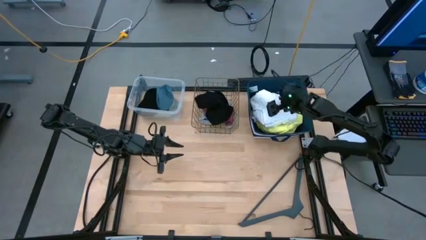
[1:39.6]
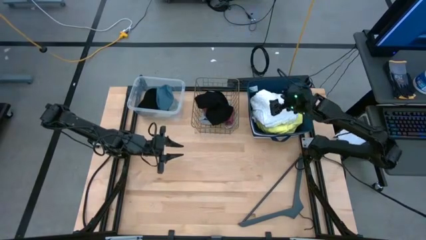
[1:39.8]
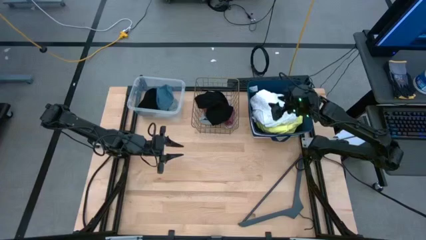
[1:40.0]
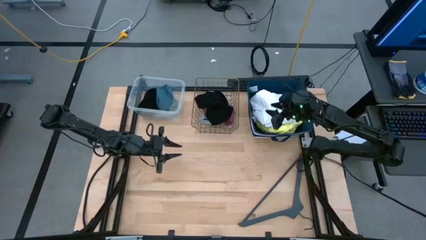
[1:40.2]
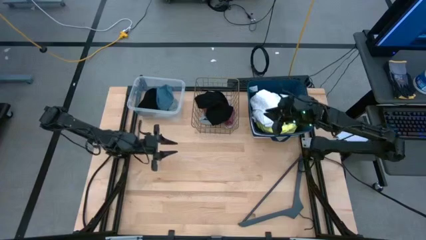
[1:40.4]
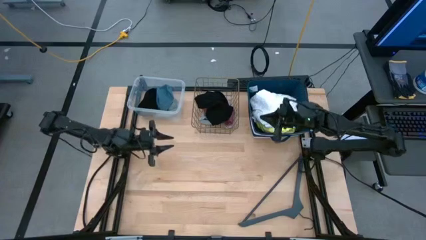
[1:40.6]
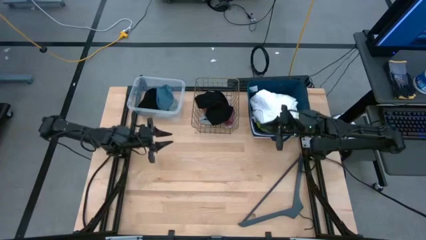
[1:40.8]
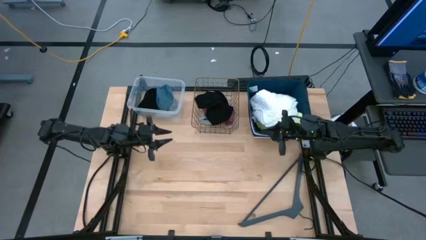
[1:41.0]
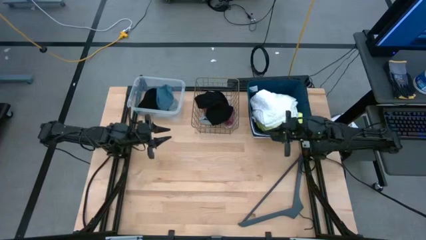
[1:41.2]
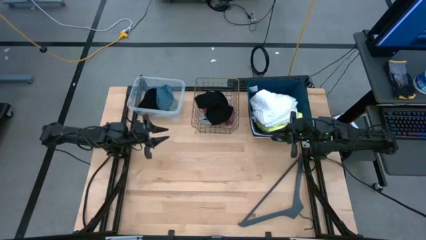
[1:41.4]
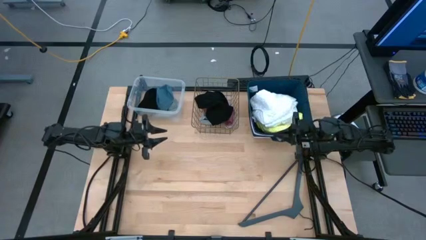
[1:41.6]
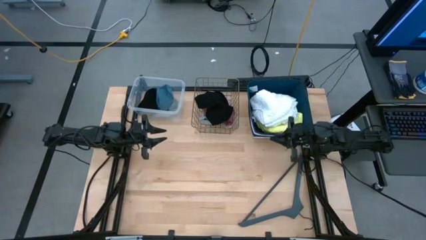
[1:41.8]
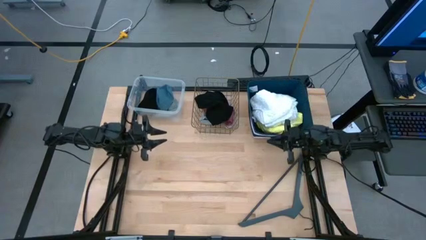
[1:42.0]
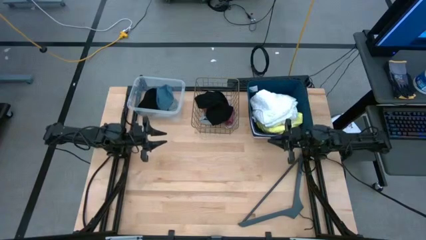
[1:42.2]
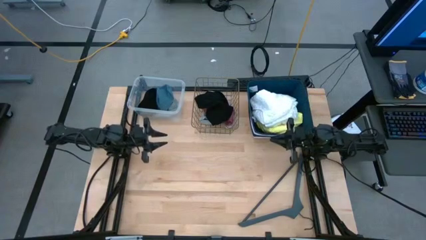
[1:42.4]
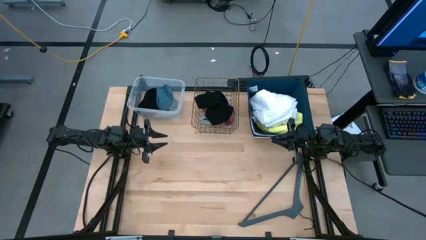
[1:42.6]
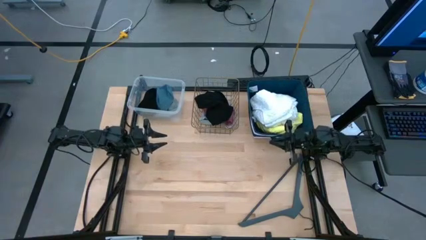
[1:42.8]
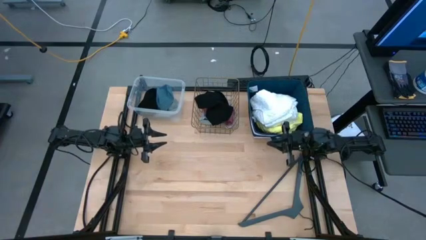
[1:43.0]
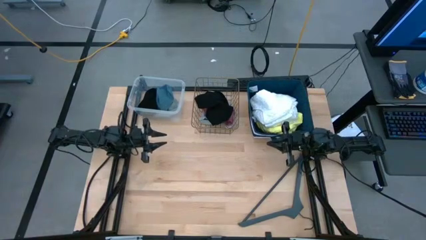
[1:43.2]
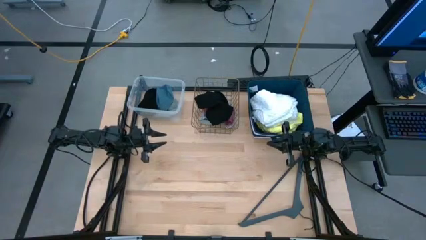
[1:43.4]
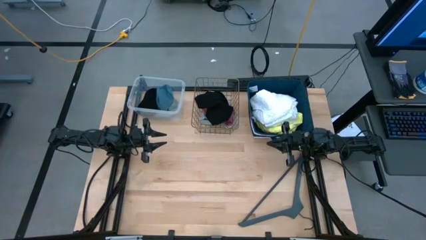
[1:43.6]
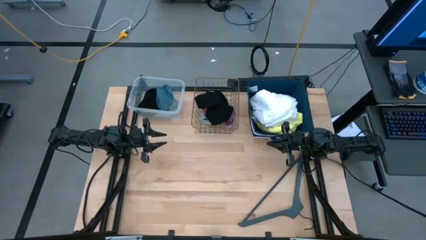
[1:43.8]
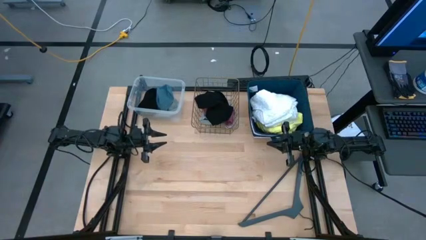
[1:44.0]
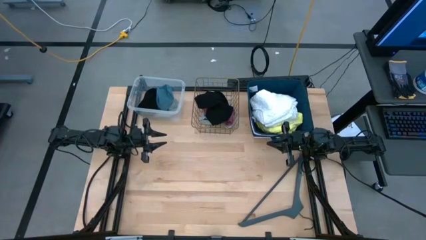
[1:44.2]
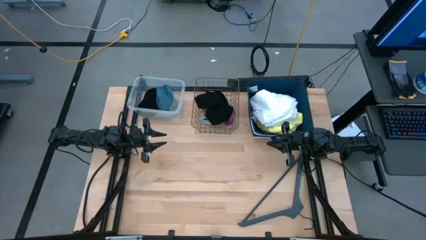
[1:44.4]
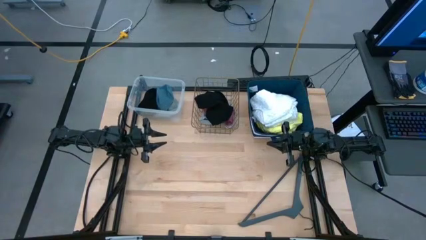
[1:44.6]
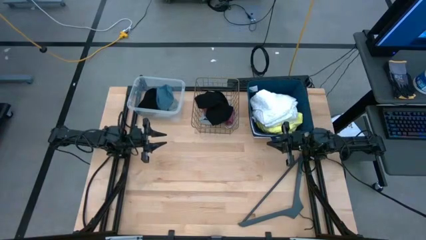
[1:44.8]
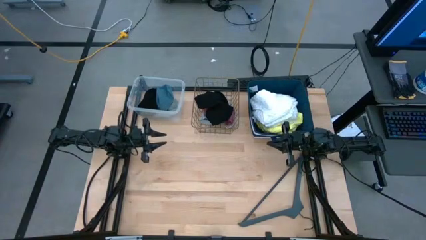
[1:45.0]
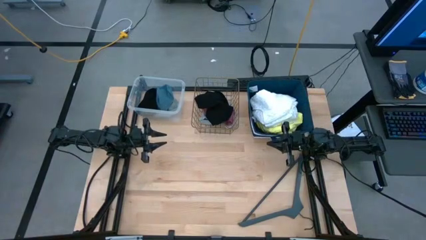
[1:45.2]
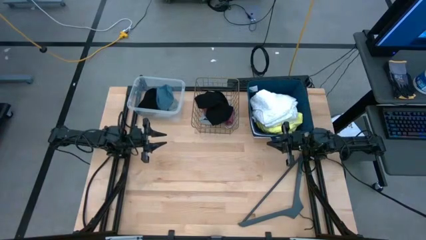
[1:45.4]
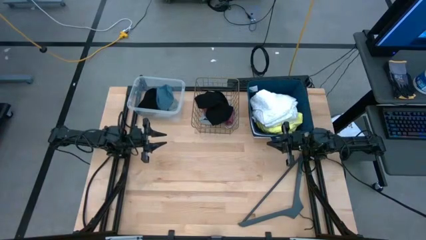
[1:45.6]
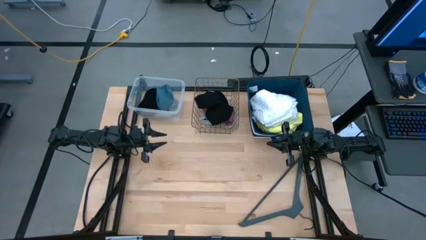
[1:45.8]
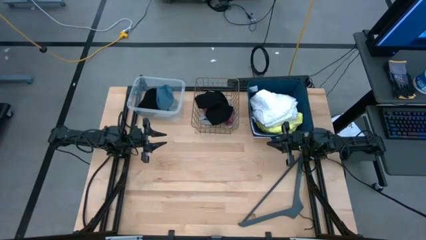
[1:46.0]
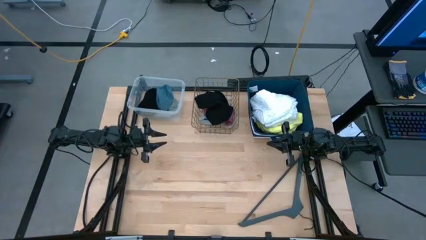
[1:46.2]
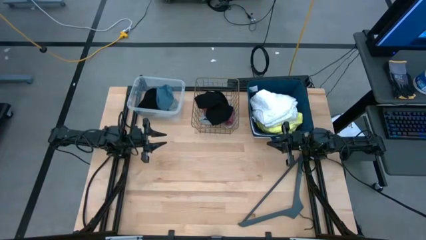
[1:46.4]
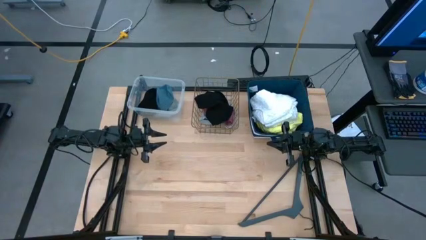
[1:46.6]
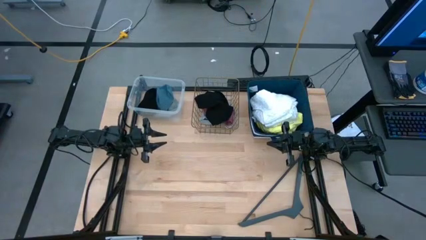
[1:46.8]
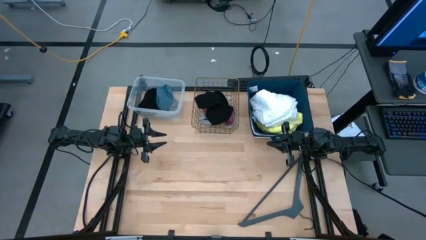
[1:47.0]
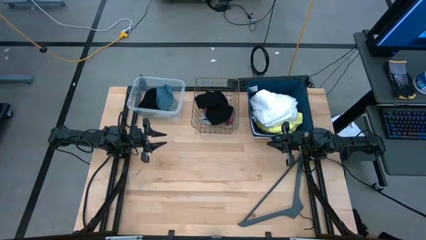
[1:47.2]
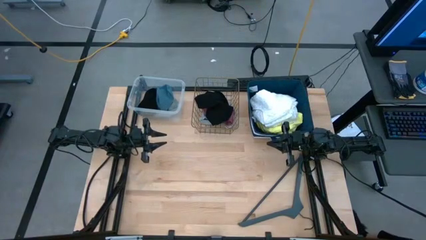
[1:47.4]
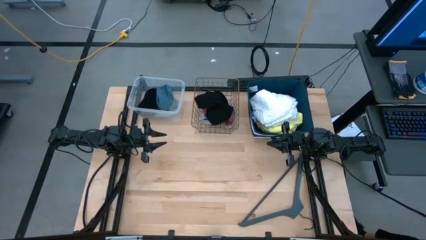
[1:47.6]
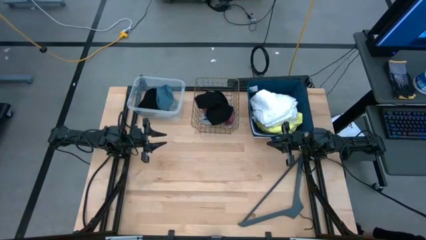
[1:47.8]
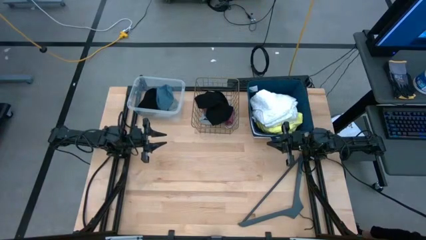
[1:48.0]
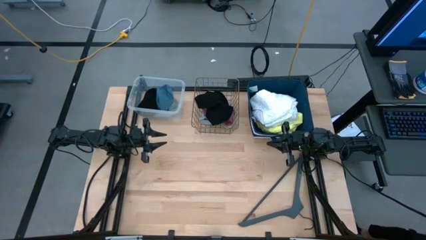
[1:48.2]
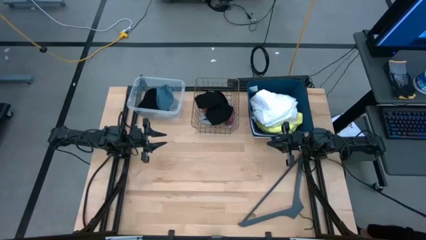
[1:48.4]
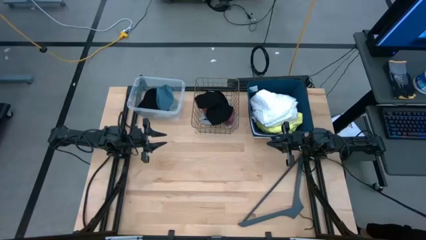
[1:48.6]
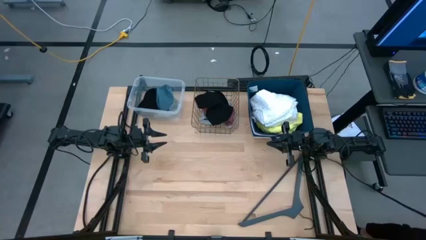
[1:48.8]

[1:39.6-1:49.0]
Task: Pick & Place Cloths
Return to Home Position

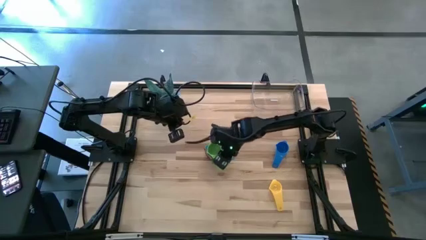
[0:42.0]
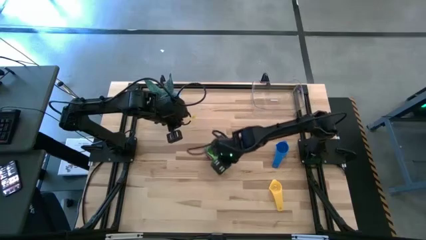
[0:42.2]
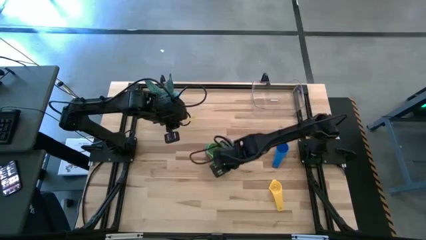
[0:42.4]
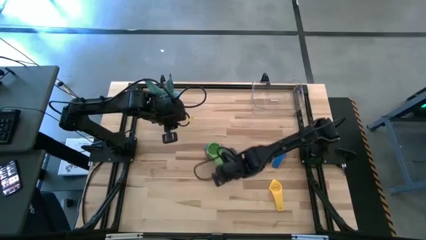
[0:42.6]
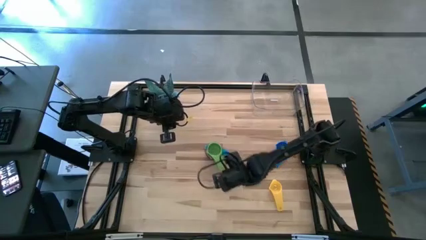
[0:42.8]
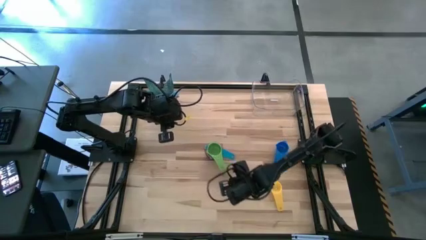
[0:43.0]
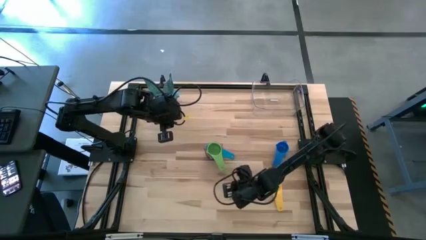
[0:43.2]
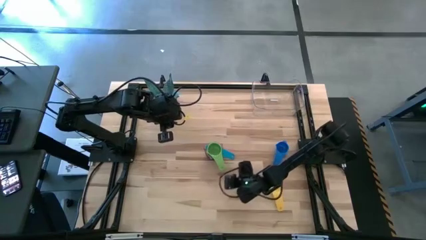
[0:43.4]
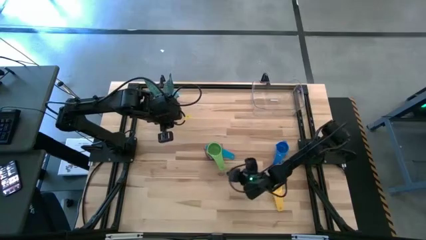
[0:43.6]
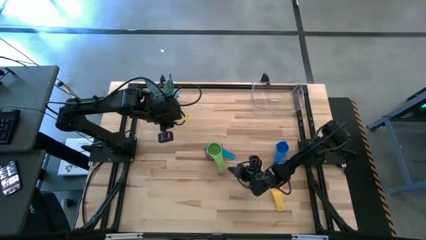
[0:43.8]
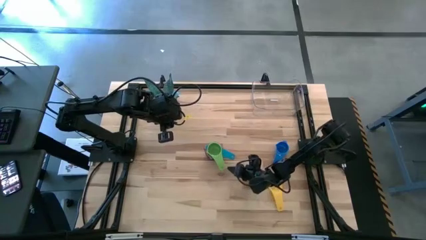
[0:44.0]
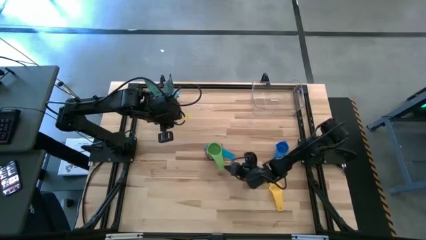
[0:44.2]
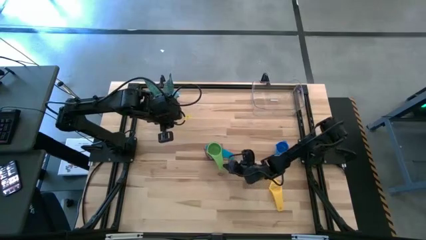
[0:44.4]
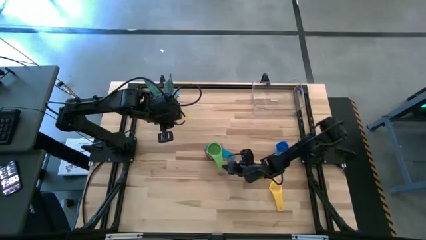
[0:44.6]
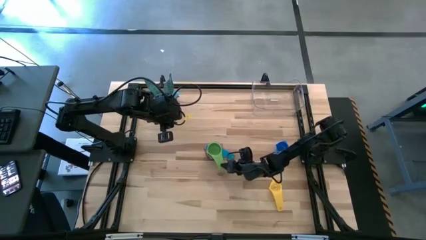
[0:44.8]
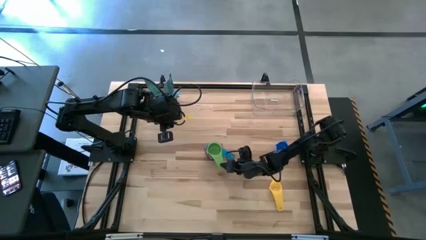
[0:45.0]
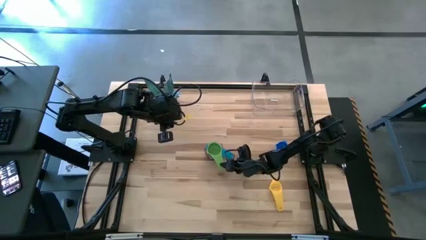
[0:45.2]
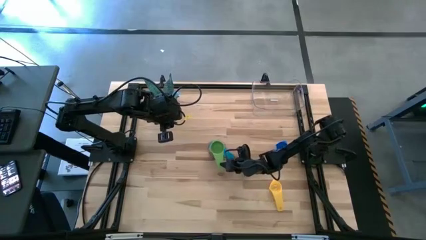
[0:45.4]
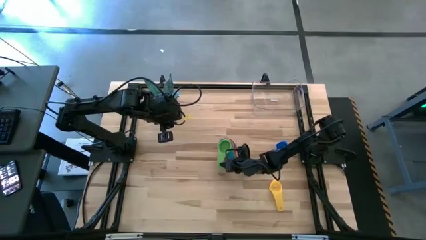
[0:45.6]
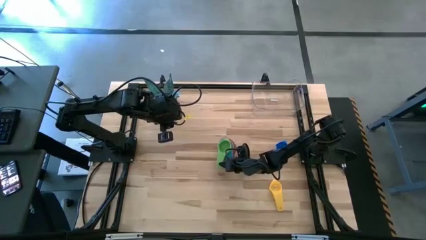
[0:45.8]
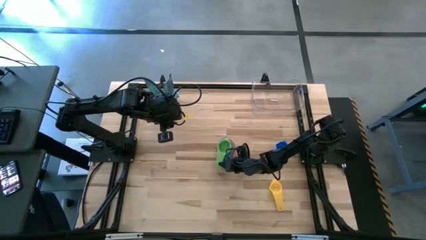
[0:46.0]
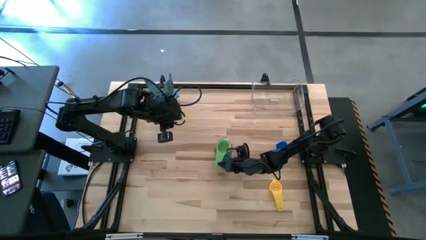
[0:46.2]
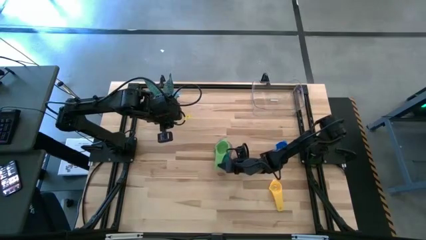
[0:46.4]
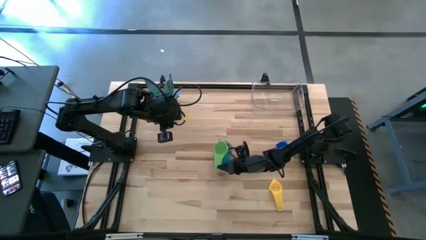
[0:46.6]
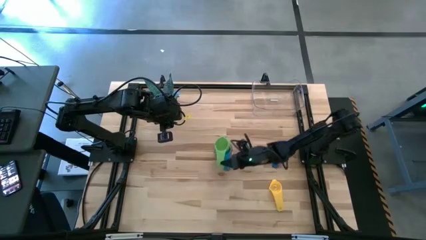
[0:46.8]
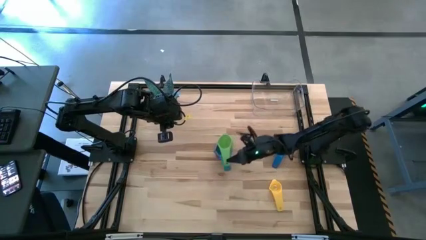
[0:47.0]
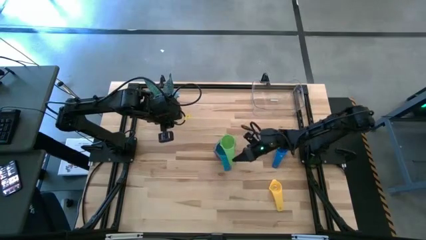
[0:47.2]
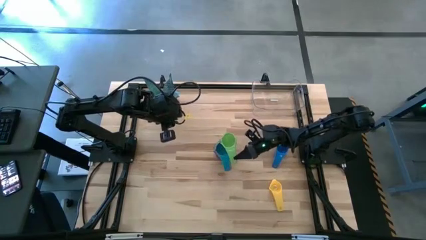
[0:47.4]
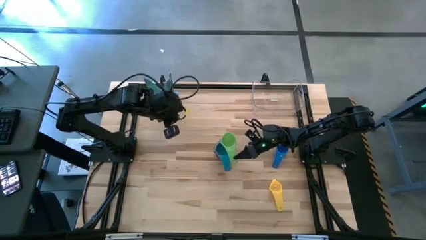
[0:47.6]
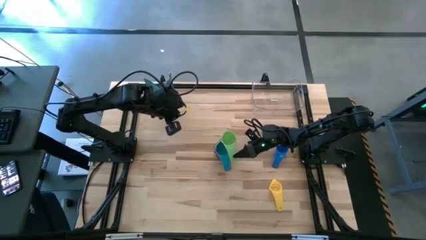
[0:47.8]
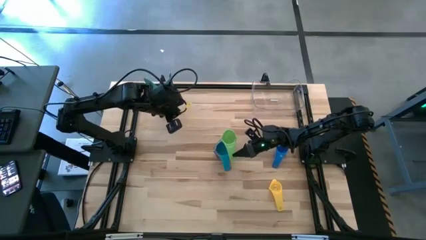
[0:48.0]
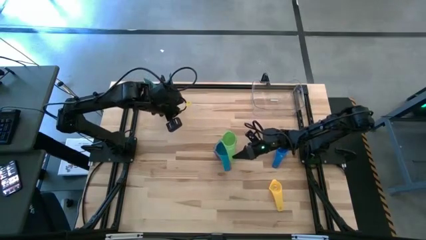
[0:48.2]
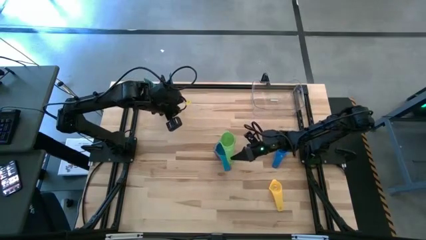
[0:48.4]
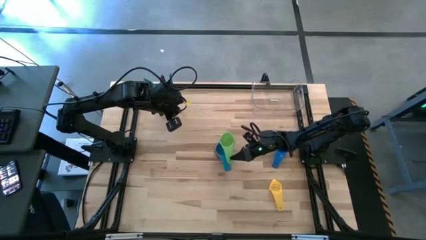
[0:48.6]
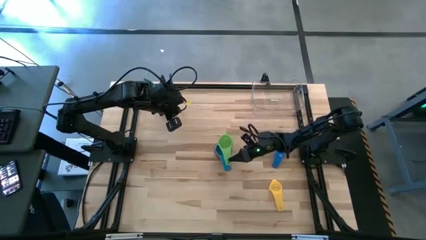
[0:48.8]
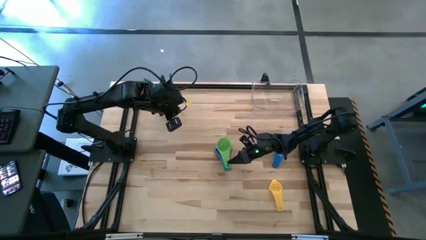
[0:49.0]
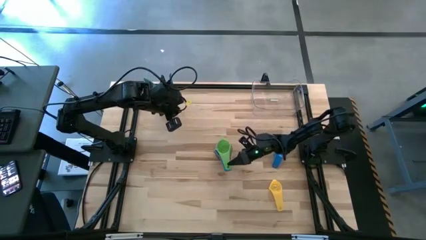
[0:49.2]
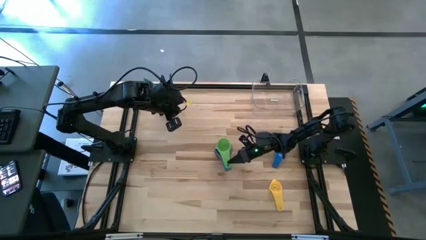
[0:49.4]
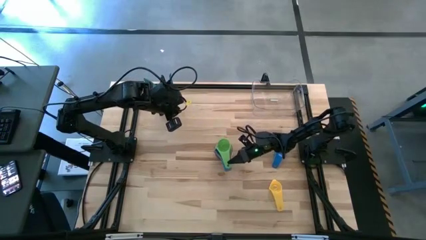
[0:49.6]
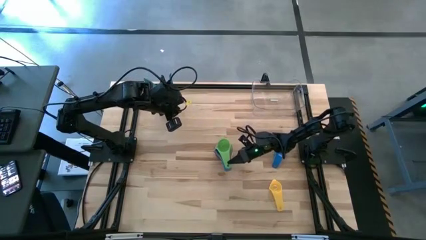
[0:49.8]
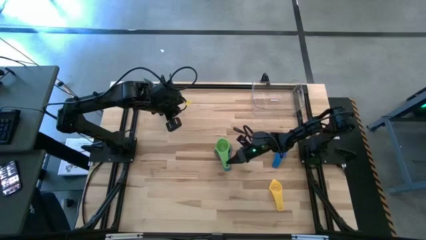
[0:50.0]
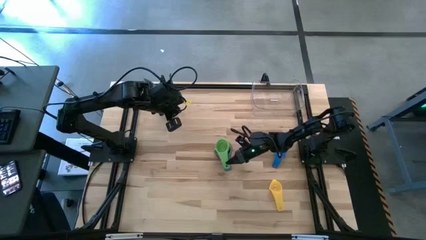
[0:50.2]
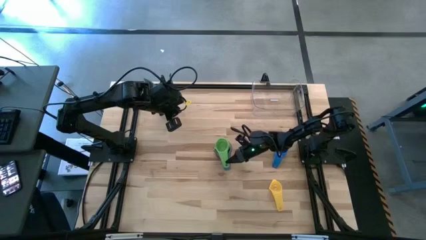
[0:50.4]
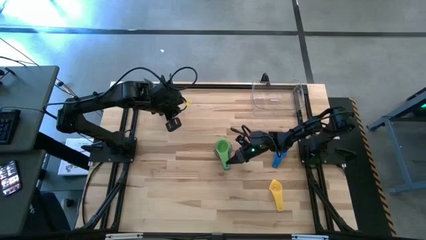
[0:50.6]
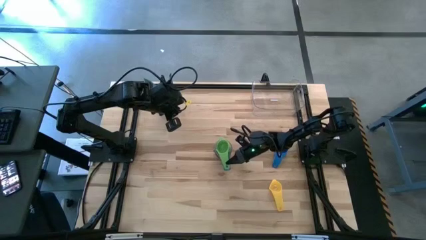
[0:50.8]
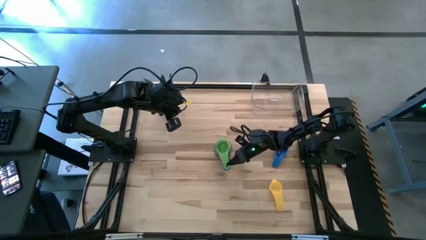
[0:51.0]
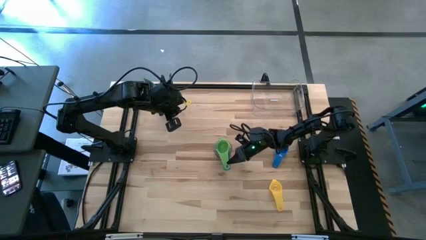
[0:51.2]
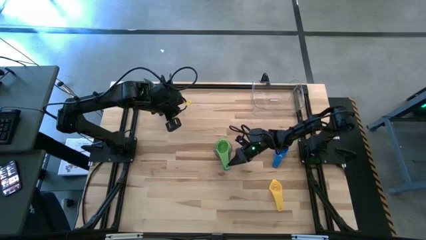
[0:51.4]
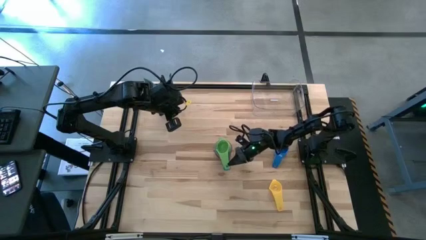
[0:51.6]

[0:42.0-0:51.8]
Task: Nest measuring cups in basket
Stack the green measuring cup on top of the light blue measuring cup
